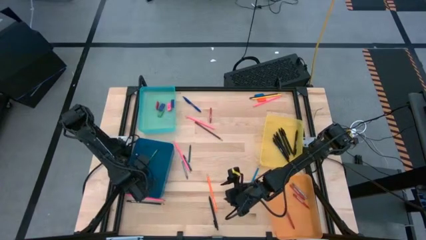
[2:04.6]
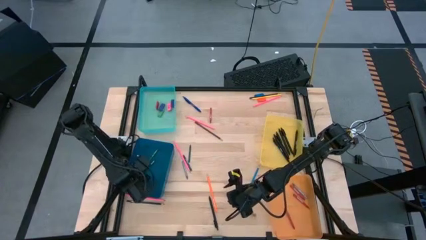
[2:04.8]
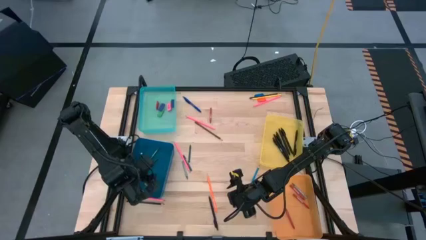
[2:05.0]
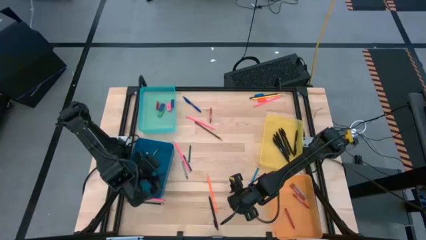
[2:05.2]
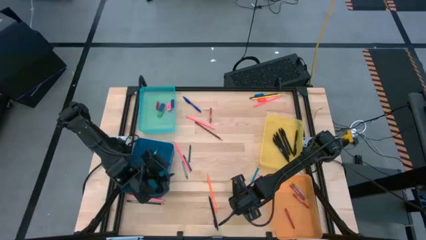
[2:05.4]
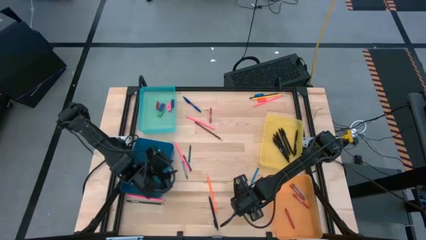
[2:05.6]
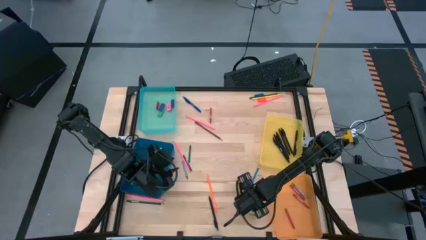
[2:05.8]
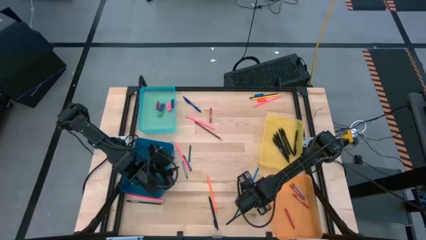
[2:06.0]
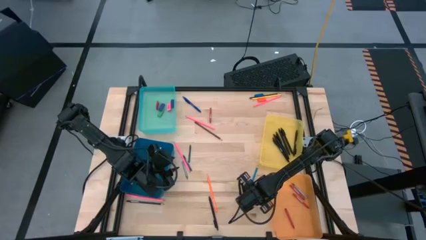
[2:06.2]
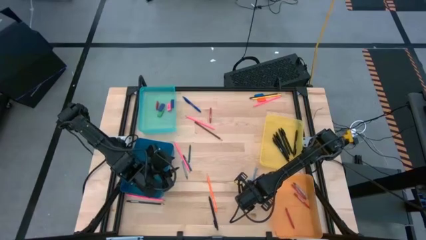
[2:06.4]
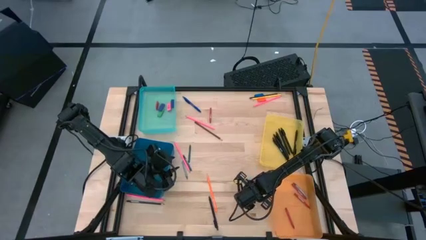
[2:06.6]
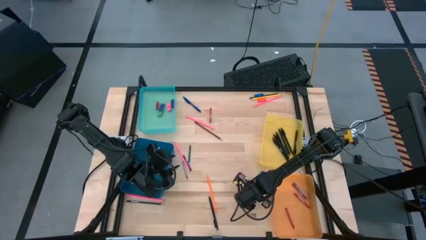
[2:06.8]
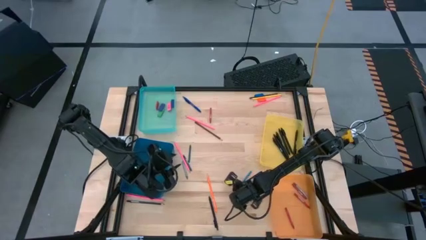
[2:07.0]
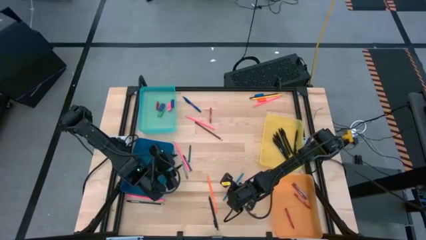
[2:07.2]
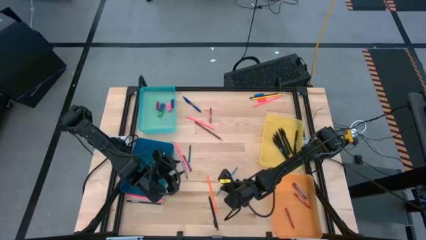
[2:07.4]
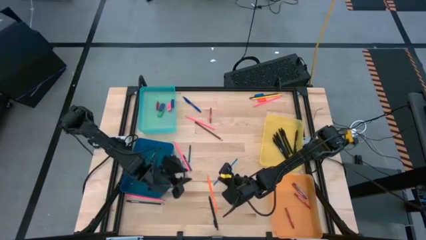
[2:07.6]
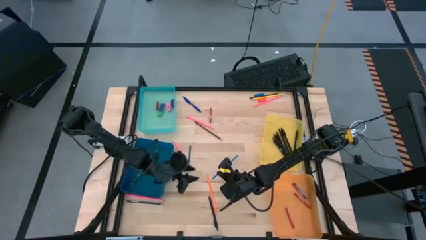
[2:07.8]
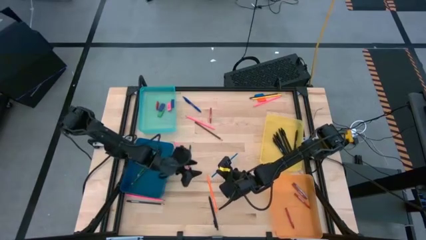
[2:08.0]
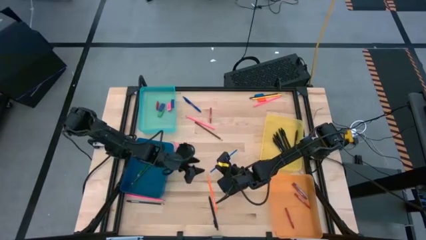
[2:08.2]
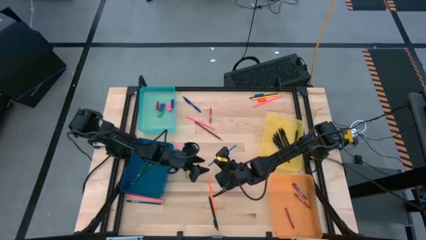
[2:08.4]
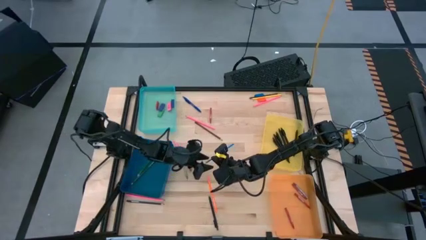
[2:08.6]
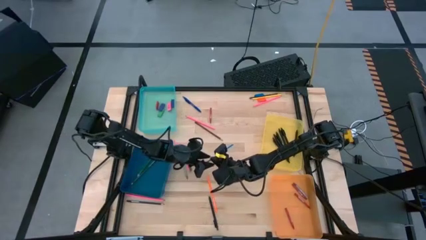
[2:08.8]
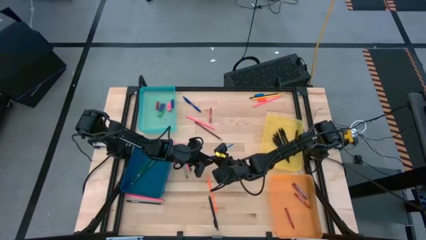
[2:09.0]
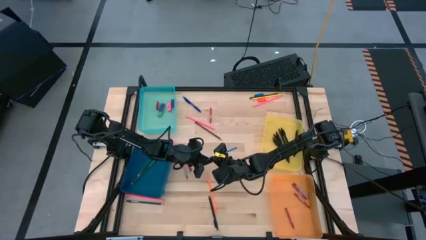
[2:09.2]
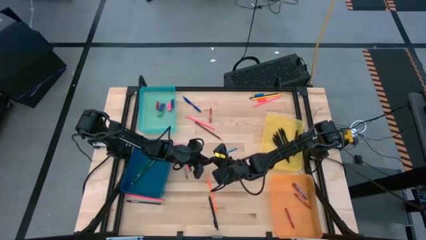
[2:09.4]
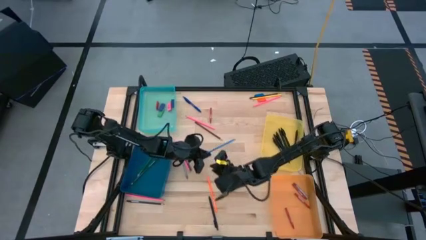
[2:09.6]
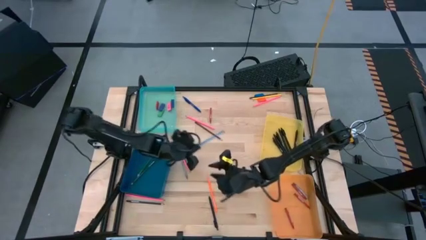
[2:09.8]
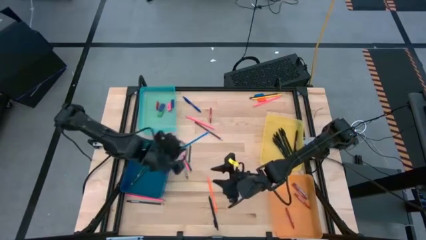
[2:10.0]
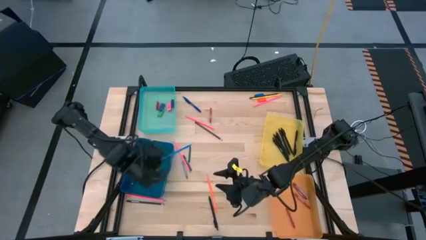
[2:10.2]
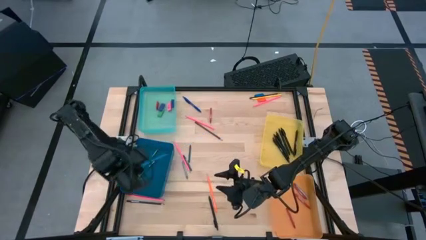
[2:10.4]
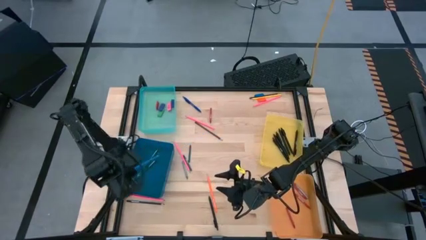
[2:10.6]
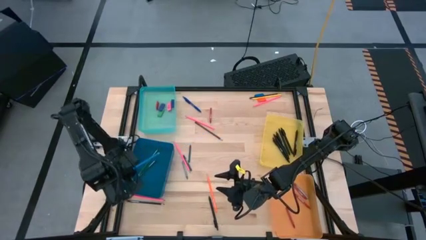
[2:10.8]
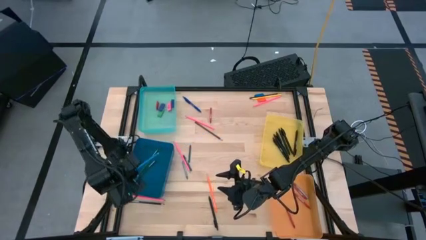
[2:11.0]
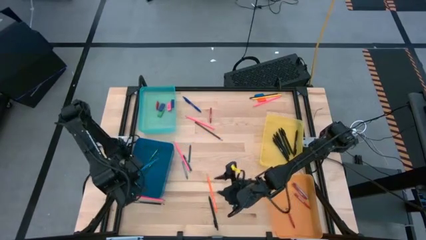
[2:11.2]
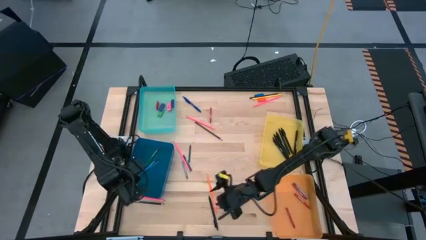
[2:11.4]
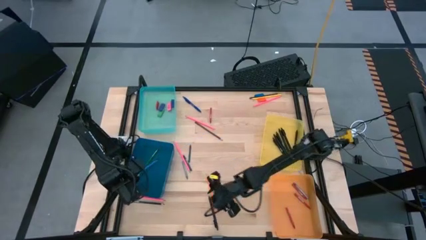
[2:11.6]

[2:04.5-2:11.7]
Task: Sort crayons/erasers/pens/pencils in bins
Put the blue colored pencil into the blue bin

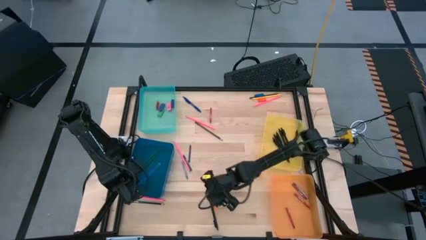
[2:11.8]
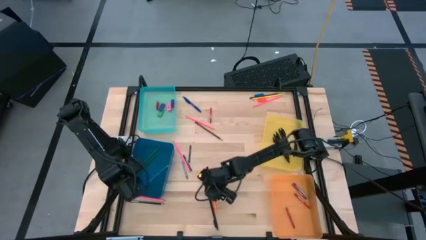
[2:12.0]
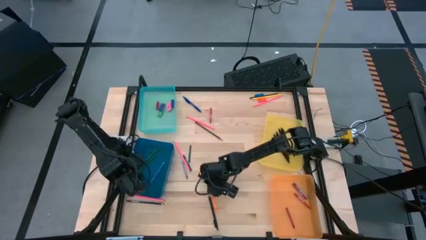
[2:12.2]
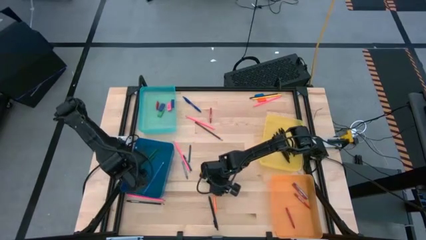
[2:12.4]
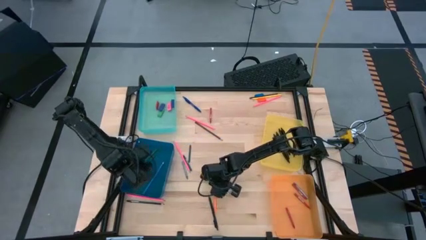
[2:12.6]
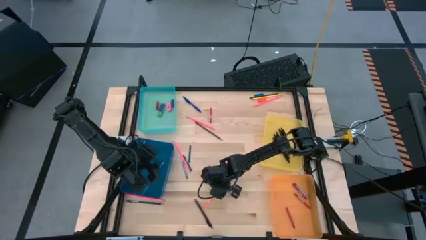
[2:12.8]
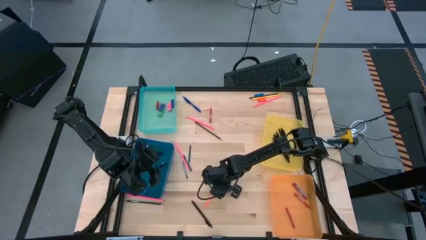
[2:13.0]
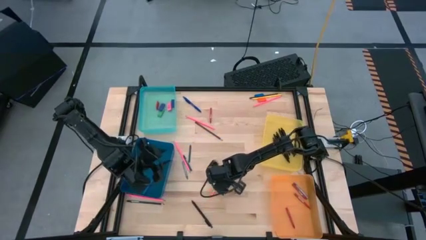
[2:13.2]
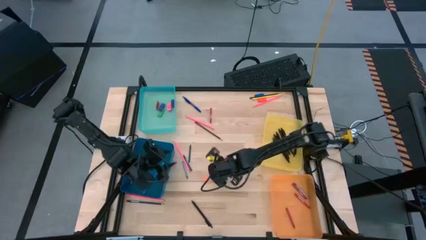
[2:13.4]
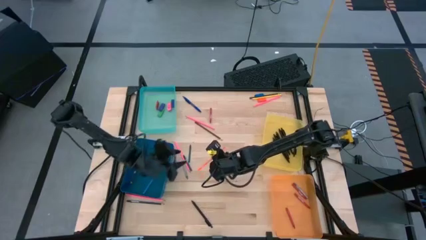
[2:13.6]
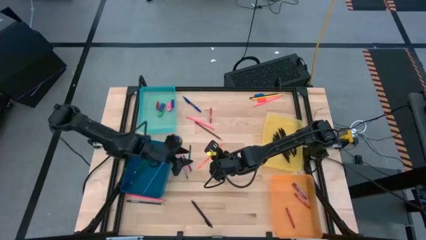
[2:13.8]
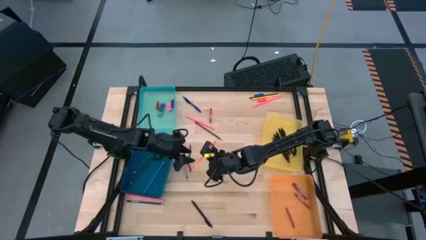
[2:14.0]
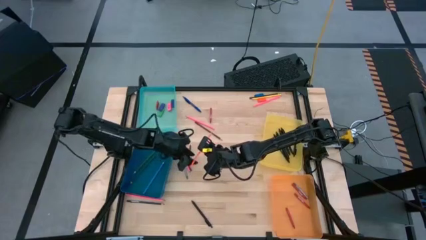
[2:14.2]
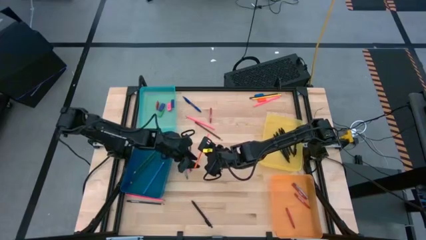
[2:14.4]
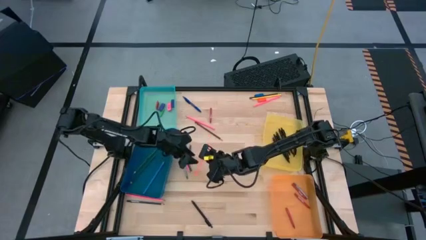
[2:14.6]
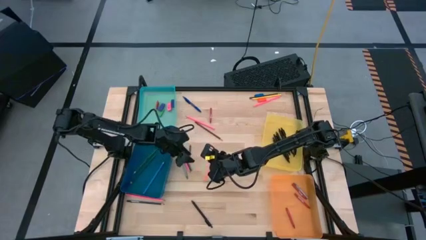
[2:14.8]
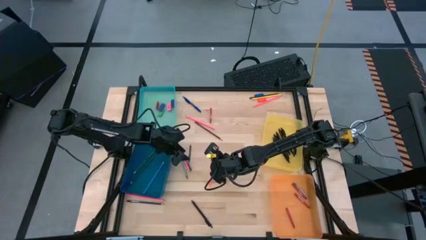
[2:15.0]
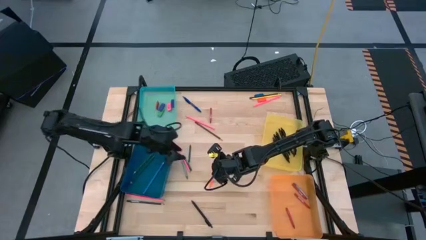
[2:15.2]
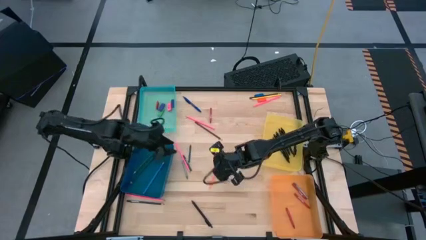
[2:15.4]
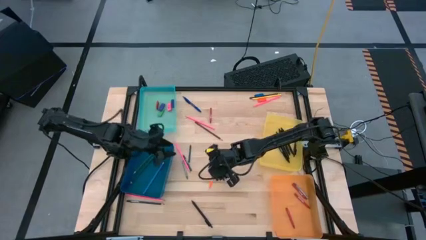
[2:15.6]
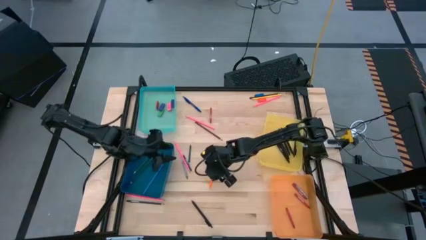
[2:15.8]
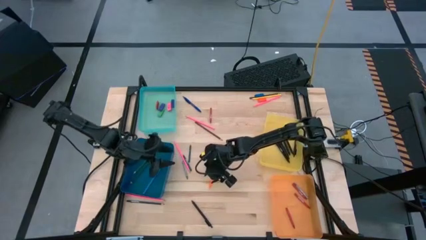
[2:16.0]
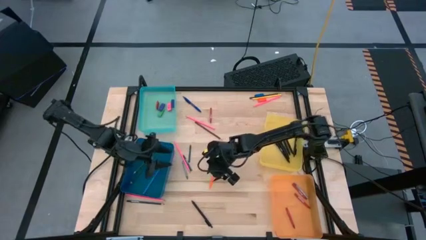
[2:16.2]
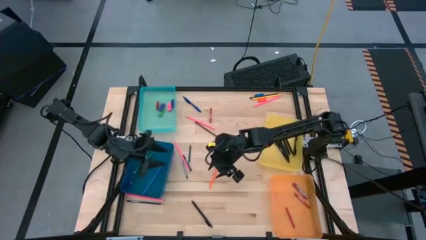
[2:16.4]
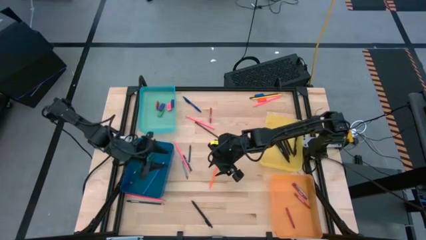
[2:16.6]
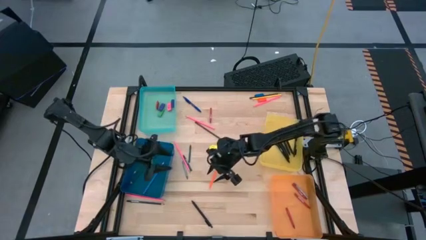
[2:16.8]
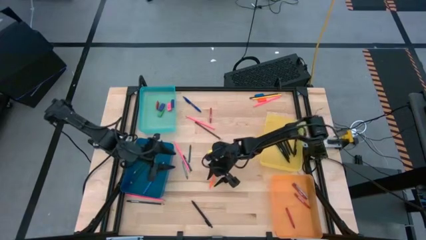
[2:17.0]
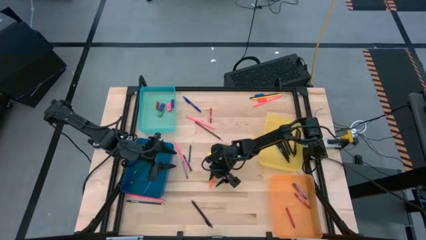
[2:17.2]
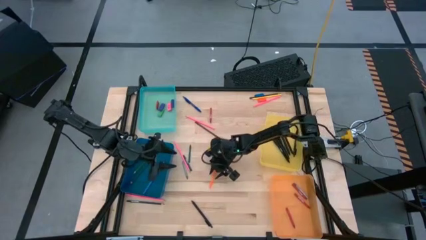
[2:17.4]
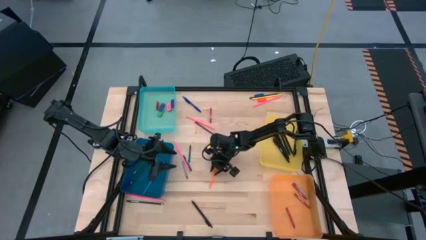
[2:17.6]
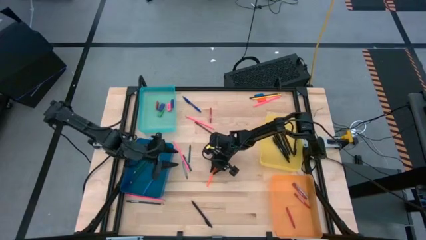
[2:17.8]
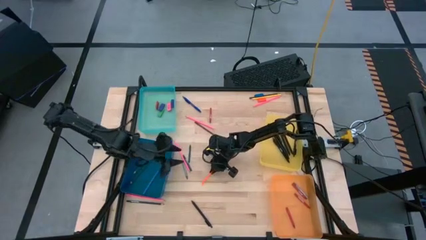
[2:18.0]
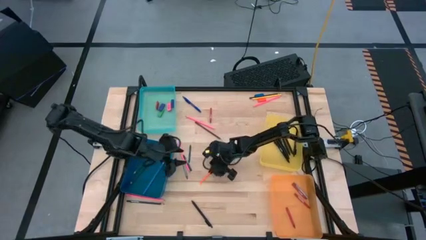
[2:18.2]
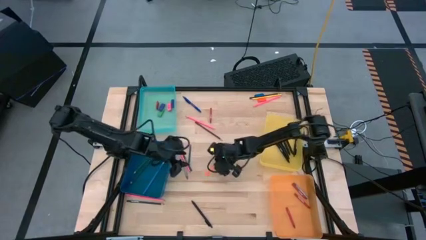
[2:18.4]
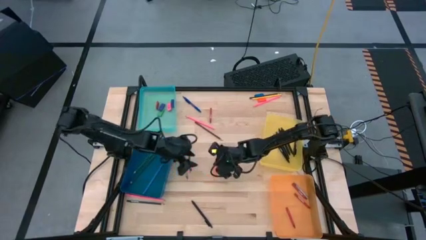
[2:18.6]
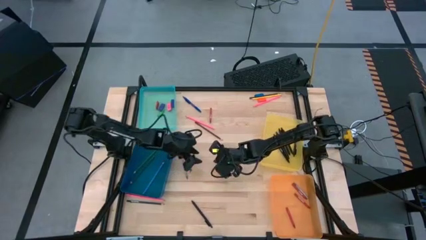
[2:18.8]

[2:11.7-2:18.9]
Put the orange colored pencil into the blue bin

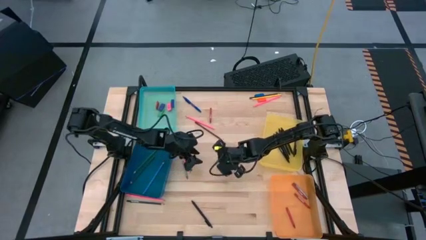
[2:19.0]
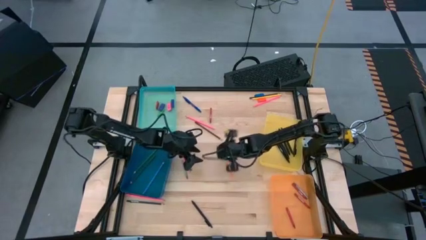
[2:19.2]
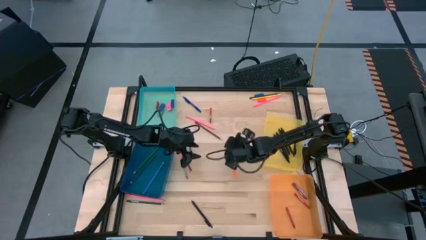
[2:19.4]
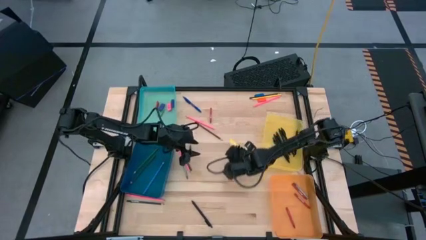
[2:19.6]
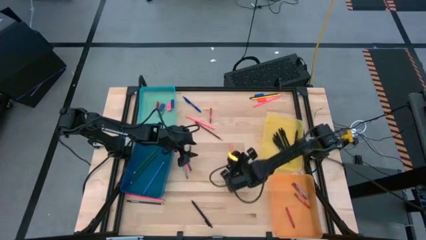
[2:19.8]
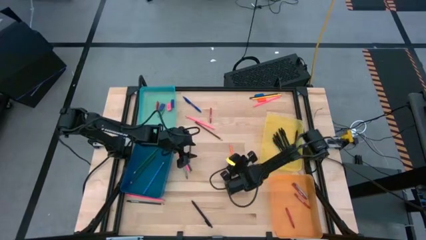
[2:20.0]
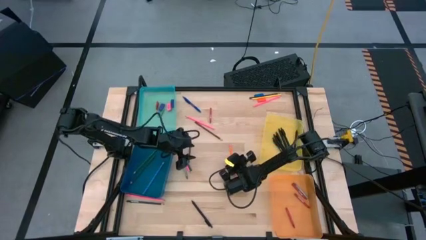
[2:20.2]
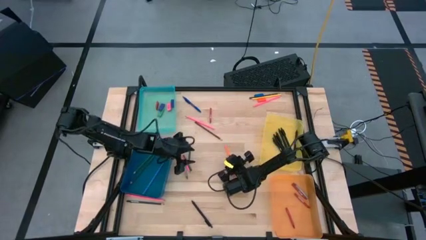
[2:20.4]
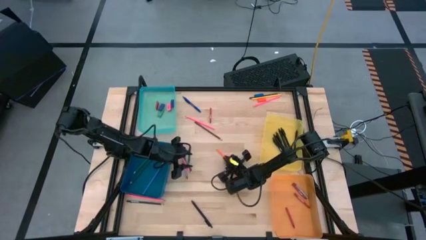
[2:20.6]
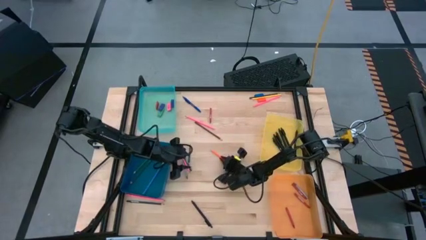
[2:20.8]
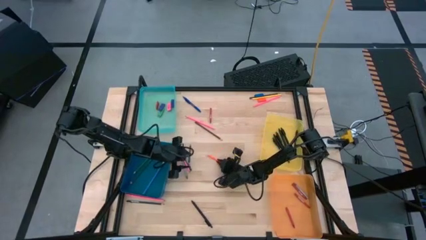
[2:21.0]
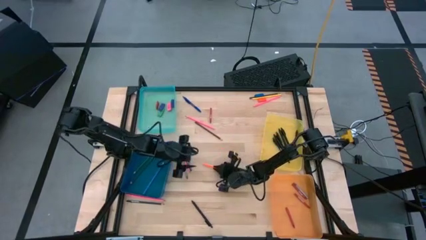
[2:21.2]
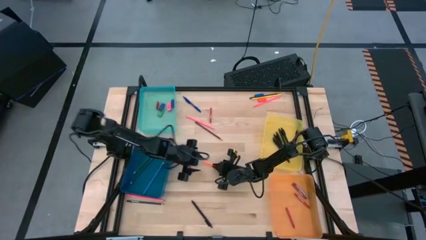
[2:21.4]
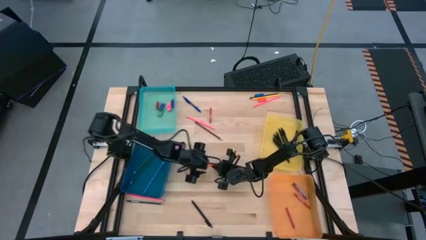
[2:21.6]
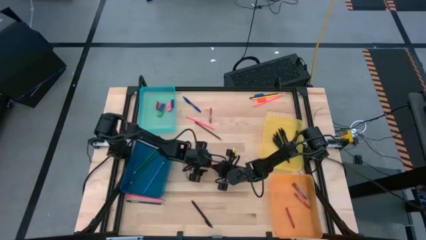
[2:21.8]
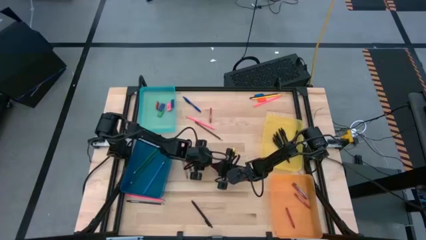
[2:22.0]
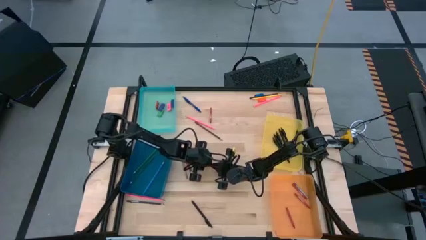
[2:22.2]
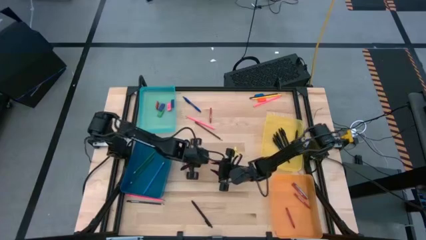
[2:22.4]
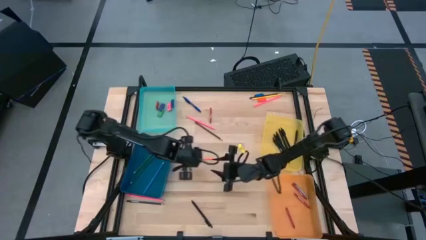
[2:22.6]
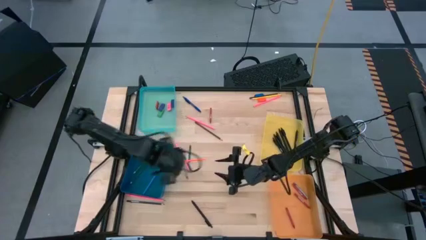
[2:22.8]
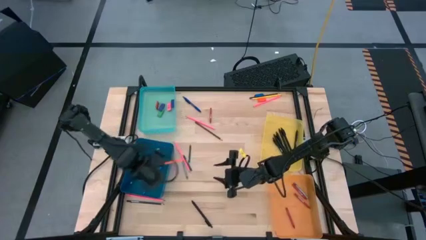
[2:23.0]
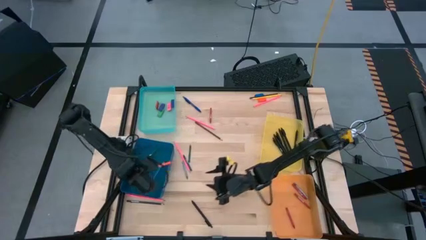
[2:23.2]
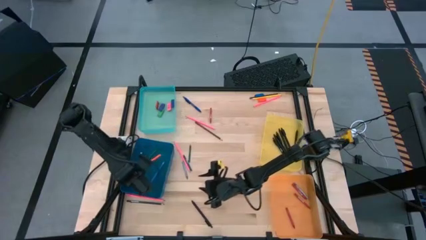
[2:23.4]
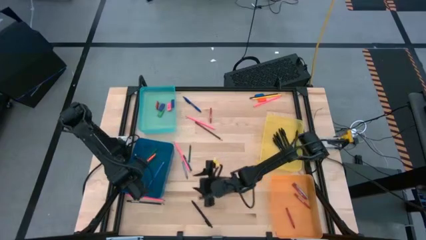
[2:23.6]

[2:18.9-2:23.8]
Put the orange colored pencil into the blue bin
